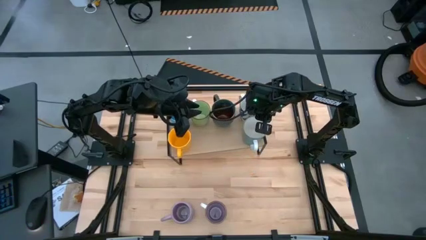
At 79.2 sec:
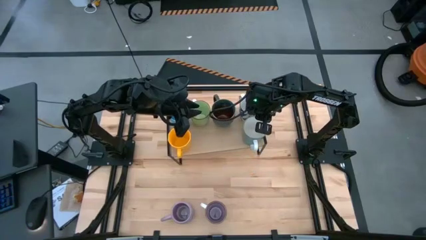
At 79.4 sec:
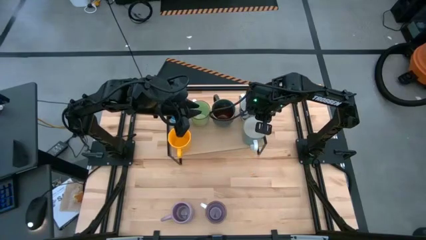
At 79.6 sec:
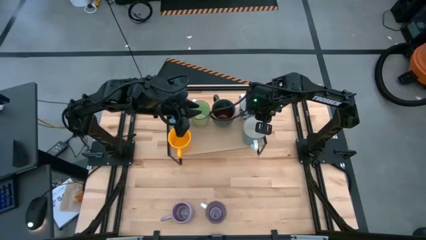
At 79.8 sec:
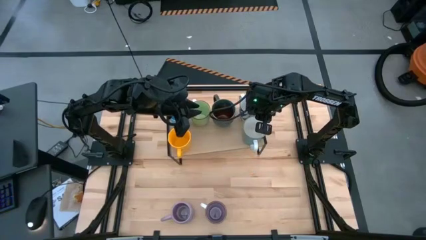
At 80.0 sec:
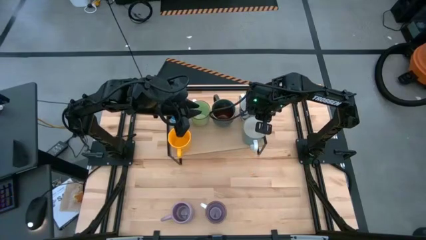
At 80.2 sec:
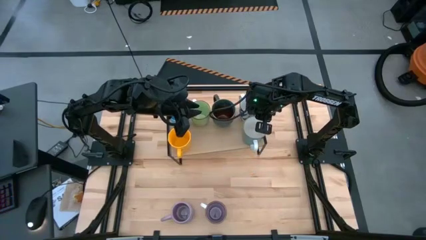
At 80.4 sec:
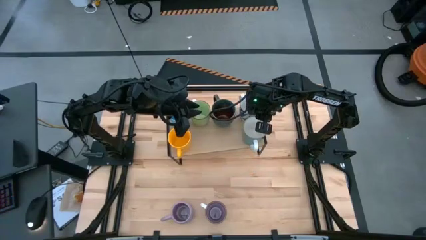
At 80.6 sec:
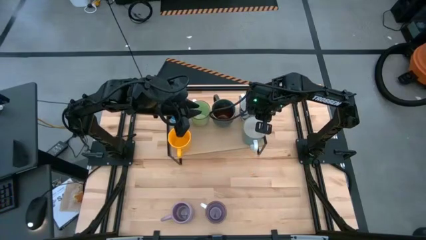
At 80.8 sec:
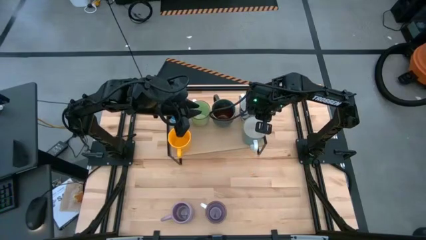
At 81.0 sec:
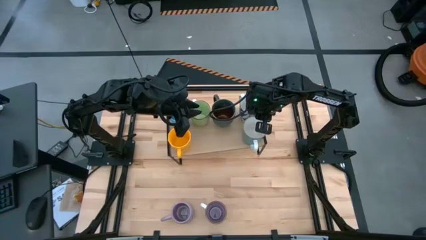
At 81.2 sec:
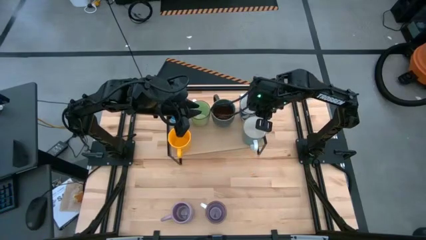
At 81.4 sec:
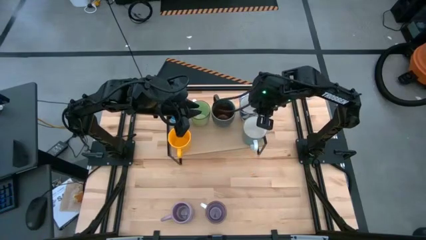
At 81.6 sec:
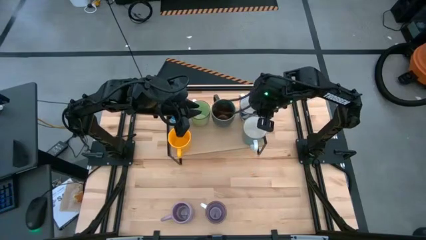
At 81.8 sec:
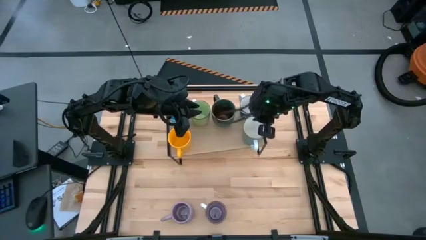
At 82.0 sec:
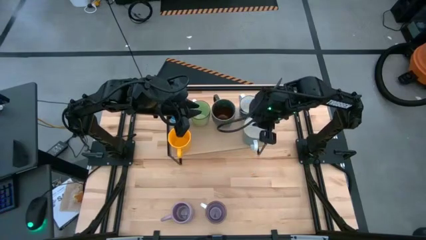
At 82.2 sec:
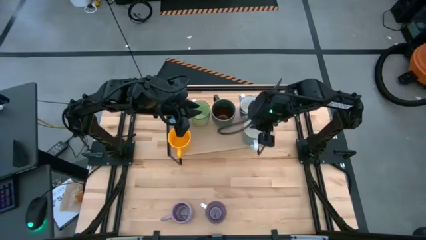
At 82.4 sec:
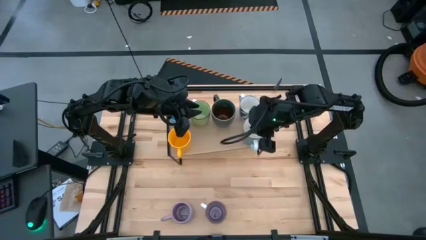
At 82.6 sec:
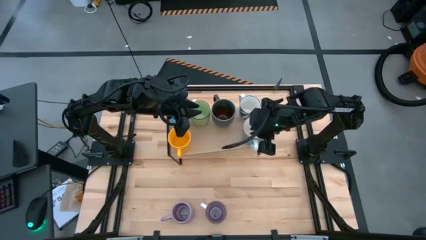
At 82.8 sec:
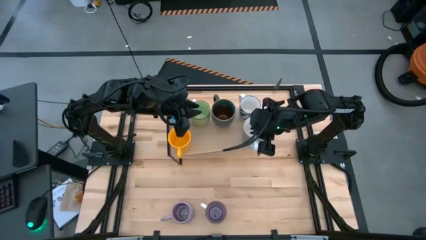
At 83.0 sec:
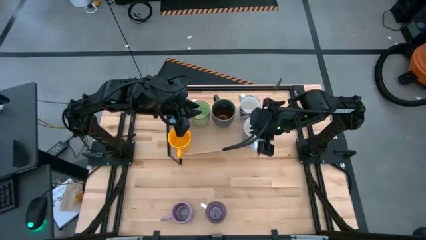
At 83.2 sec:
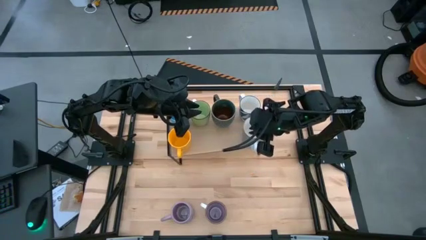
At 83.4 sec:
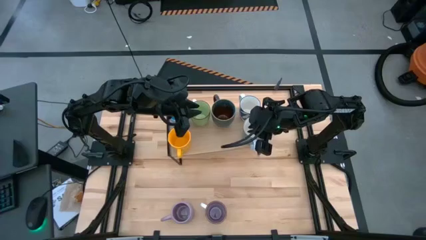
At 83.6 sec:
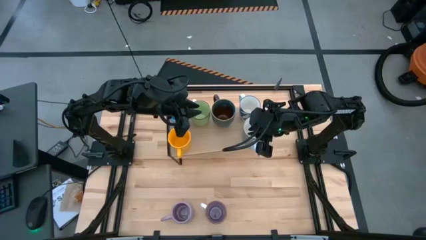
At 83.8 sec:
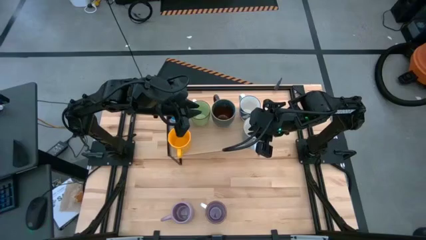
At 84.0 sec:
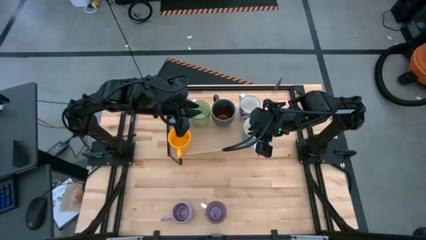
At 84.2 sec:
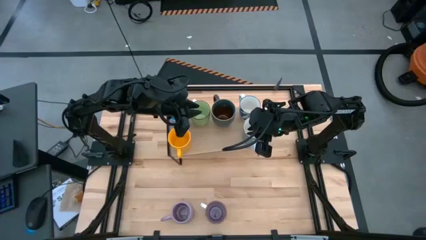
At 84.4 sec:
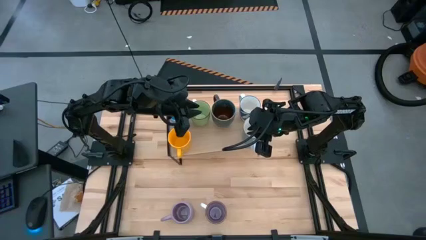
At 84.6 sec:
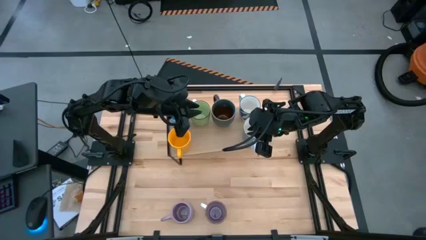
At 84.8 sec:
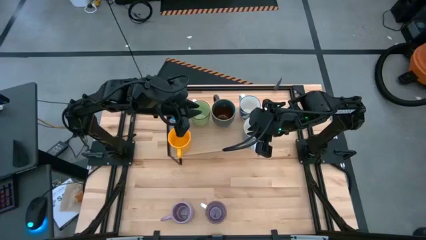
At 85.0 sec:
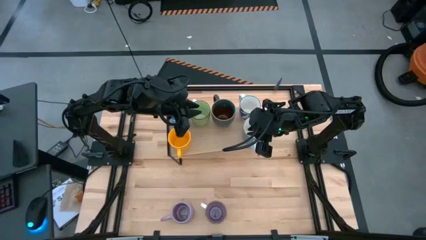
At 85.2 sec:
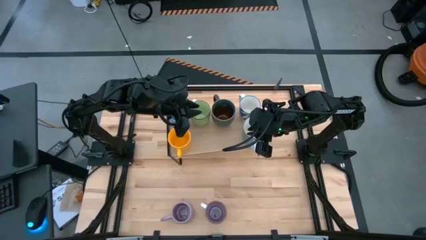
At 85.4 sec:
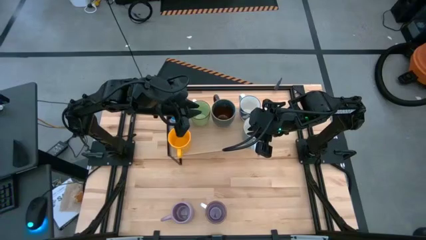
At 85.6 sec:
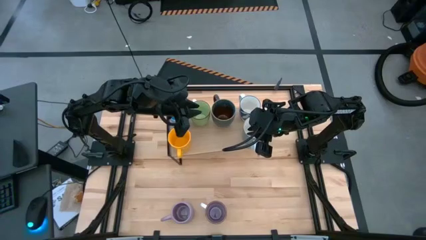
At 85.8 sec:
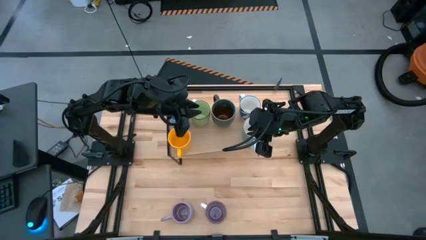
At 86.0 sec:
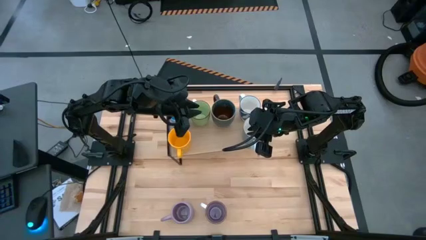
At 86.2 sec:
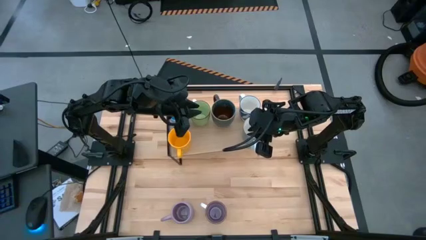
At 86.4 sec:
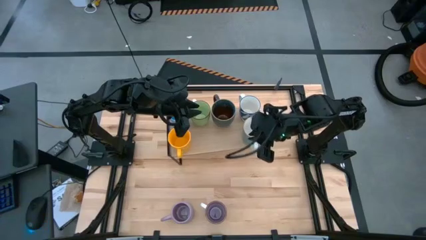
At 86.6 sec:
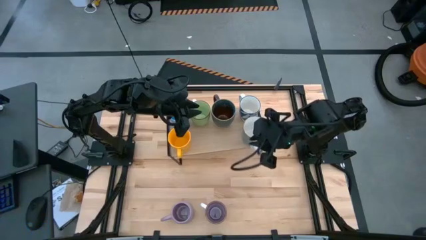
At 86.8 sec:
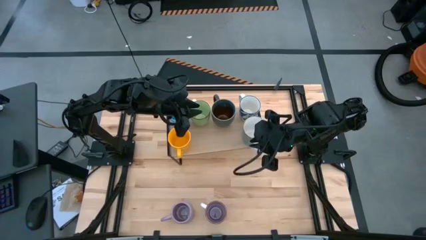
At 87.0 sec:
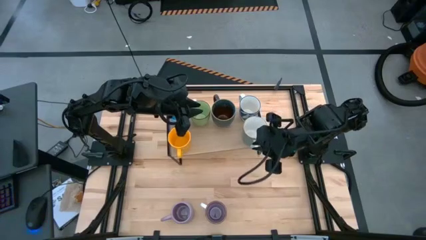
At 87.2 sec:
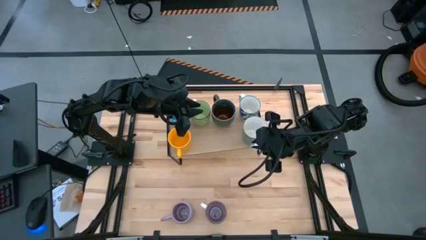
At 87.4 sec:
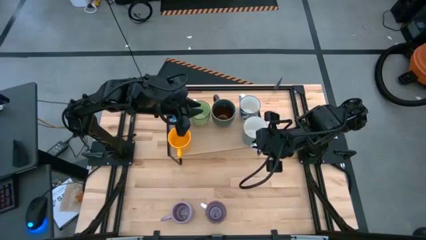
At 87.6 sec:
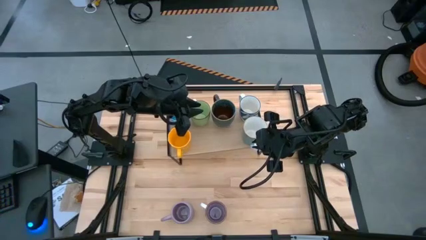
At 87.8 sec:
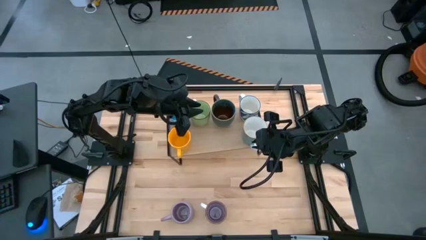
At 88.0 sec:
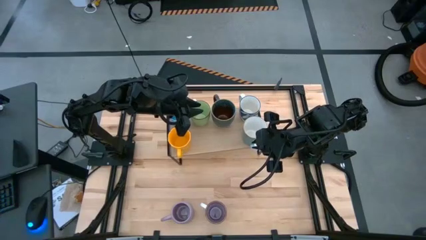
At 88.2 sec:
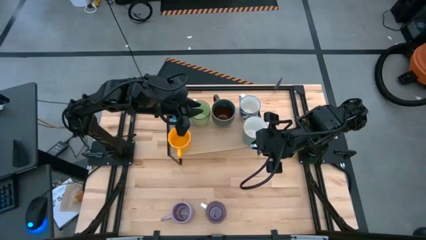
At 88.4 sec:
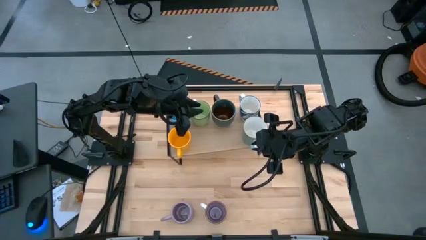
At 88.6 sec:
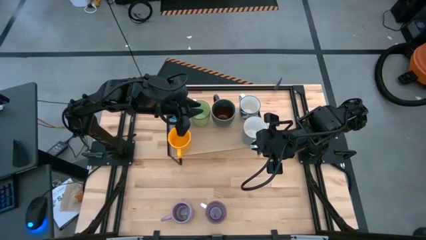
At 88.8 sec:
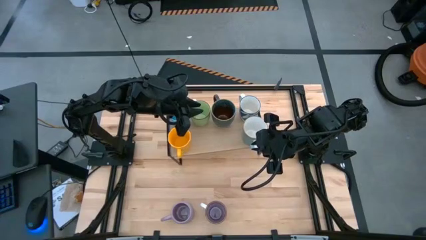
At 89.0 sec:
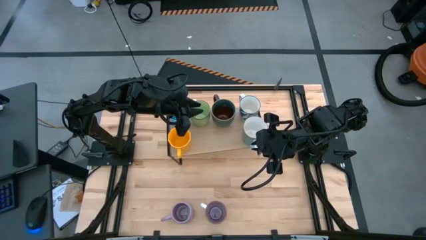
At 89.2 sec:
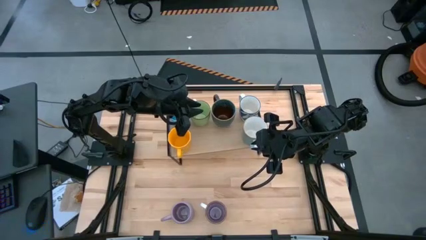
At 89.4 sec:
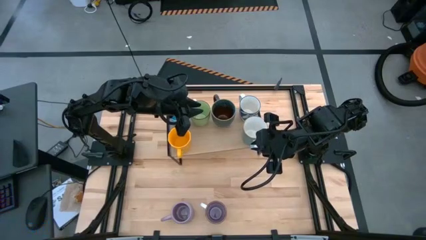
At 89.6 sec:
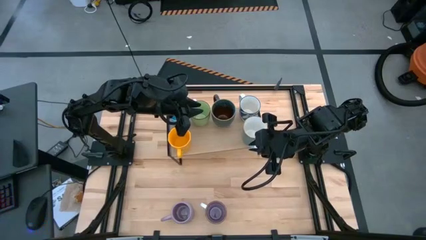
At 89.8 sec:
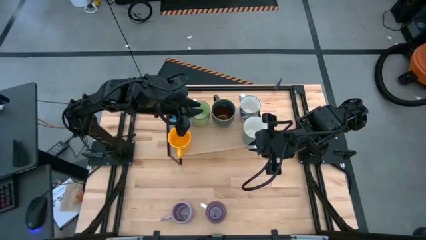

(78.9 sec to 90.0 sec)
Task: Place coffee mugs
Put the left purple white mug on the shelf
